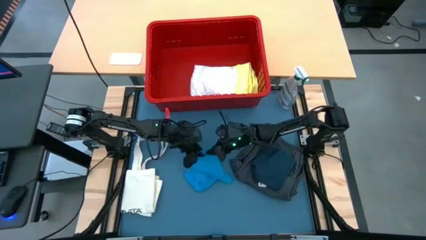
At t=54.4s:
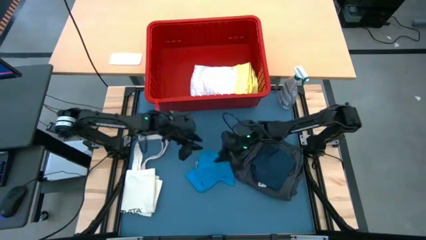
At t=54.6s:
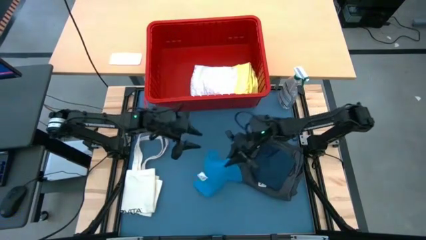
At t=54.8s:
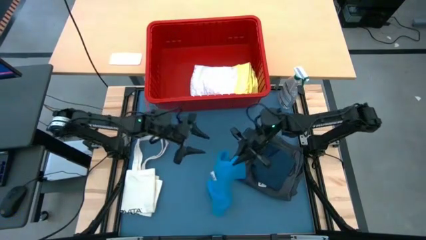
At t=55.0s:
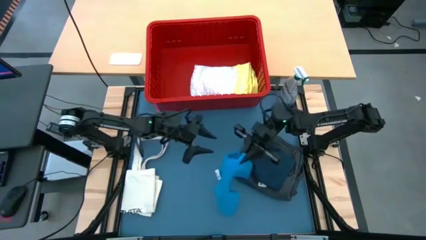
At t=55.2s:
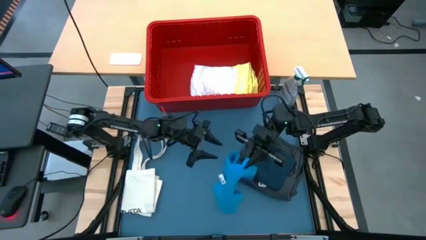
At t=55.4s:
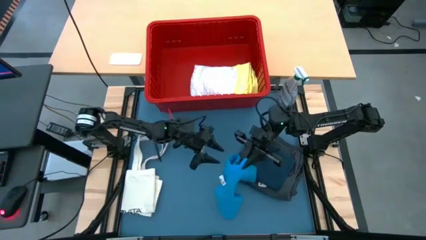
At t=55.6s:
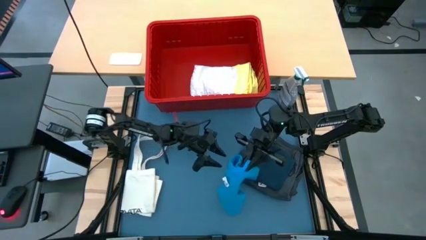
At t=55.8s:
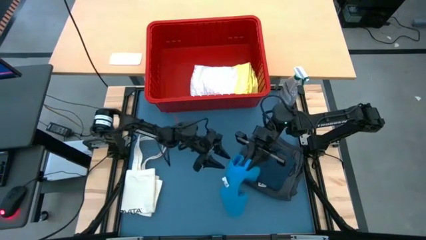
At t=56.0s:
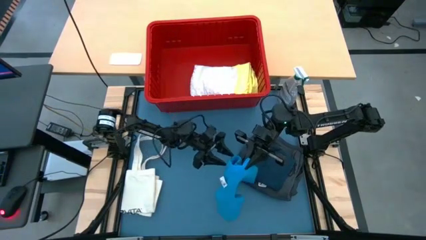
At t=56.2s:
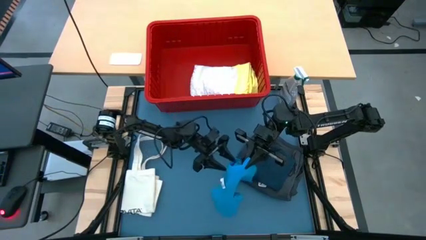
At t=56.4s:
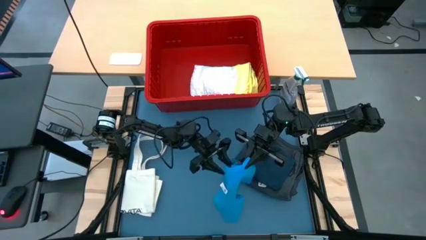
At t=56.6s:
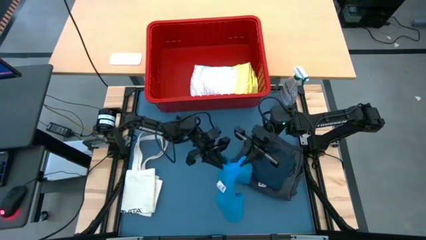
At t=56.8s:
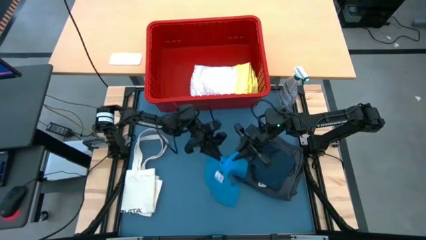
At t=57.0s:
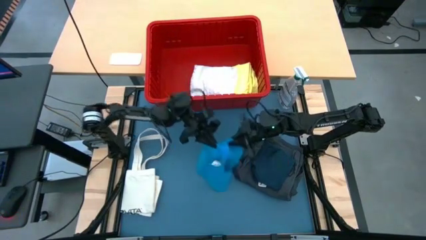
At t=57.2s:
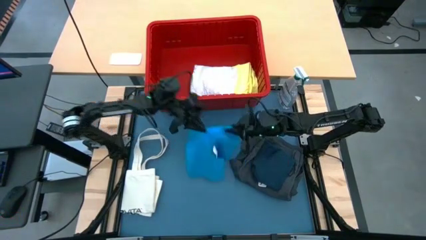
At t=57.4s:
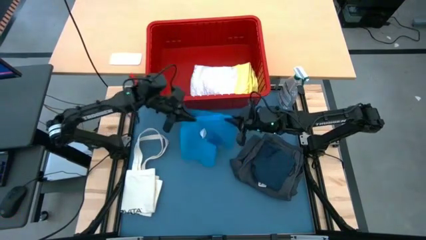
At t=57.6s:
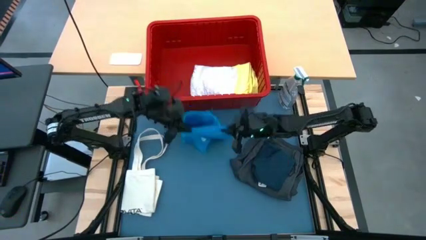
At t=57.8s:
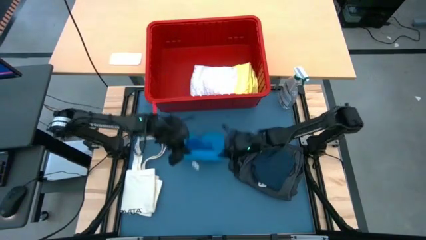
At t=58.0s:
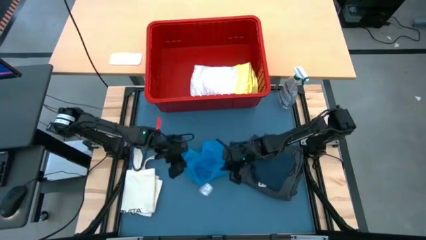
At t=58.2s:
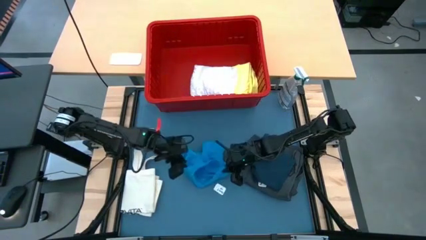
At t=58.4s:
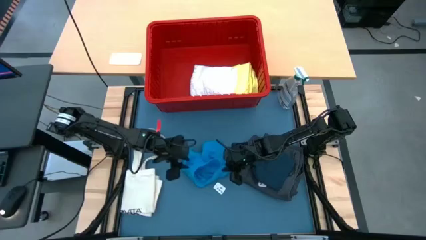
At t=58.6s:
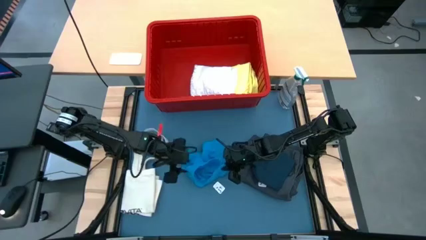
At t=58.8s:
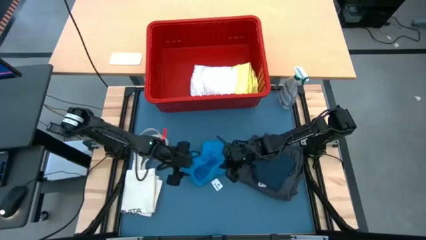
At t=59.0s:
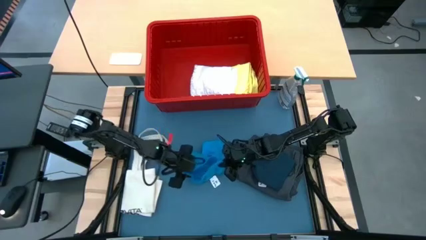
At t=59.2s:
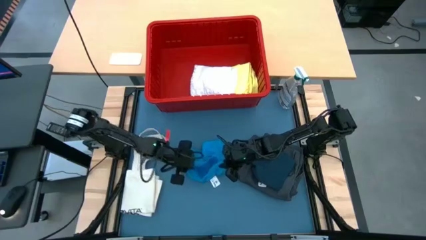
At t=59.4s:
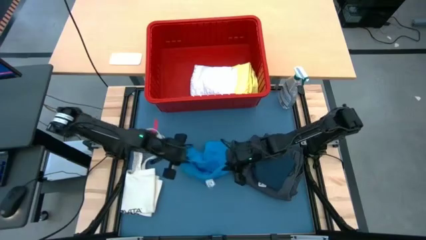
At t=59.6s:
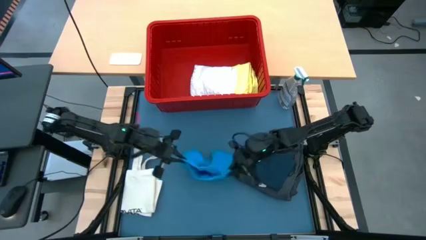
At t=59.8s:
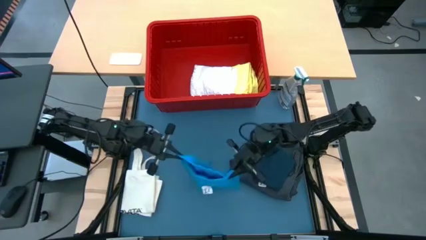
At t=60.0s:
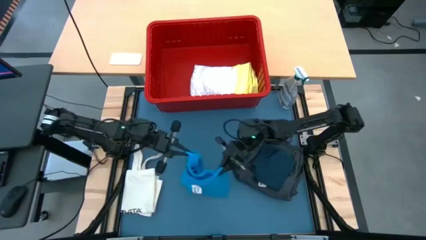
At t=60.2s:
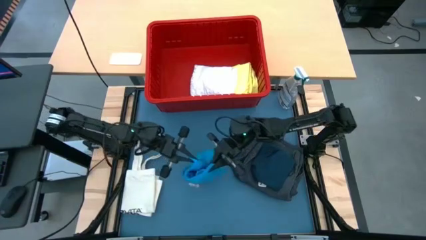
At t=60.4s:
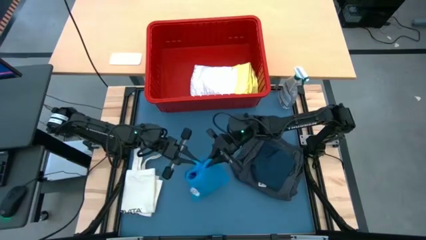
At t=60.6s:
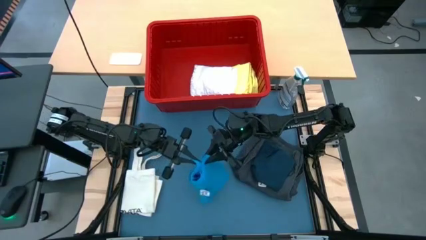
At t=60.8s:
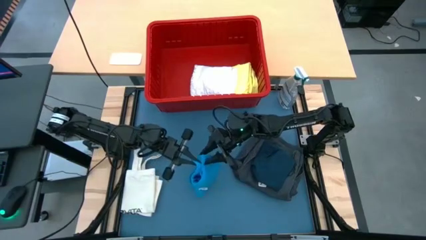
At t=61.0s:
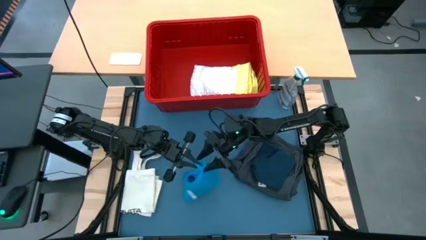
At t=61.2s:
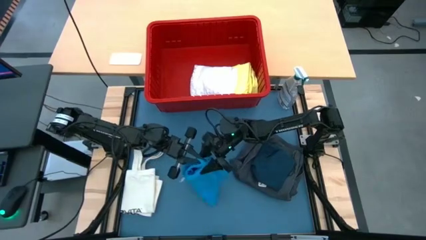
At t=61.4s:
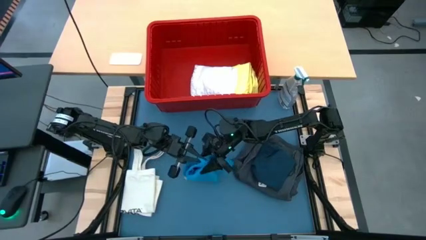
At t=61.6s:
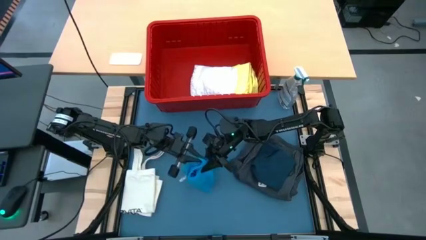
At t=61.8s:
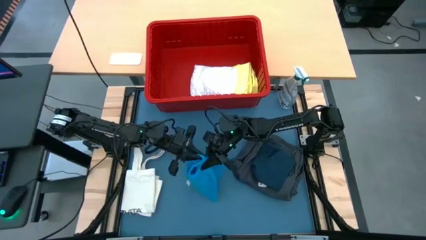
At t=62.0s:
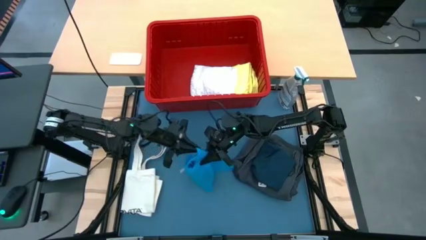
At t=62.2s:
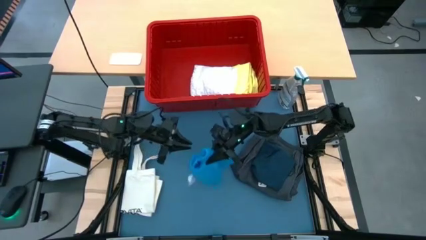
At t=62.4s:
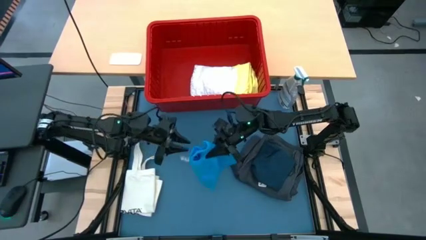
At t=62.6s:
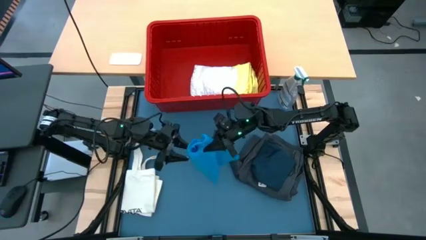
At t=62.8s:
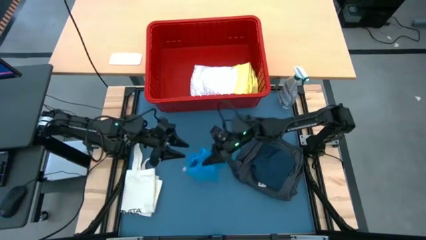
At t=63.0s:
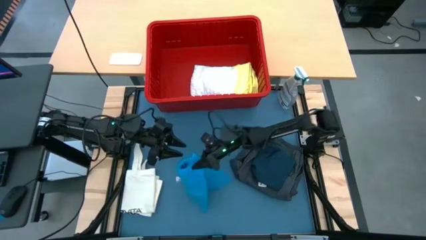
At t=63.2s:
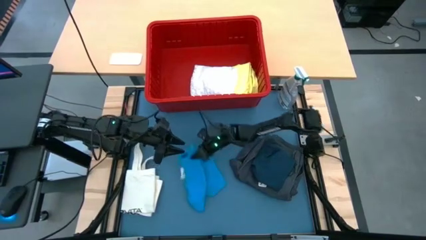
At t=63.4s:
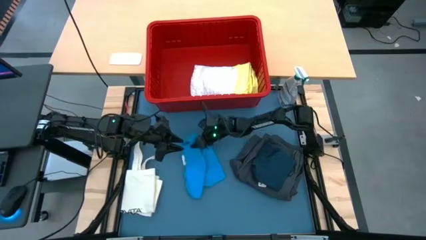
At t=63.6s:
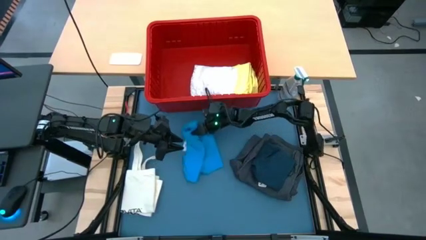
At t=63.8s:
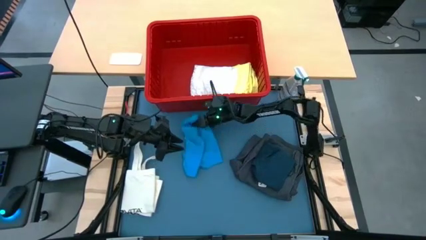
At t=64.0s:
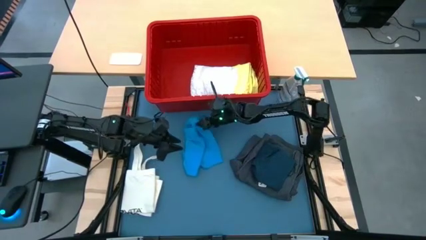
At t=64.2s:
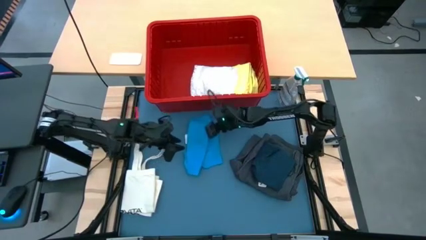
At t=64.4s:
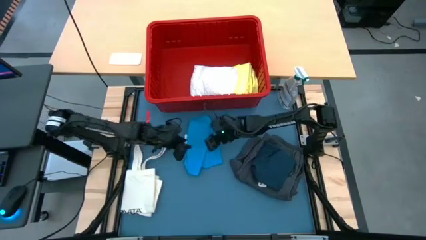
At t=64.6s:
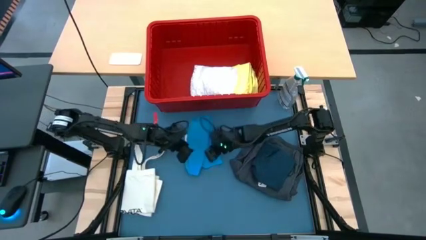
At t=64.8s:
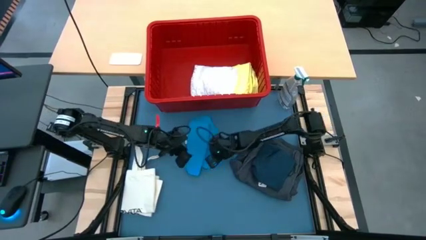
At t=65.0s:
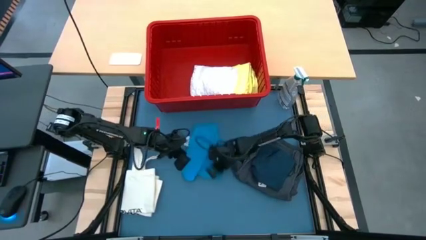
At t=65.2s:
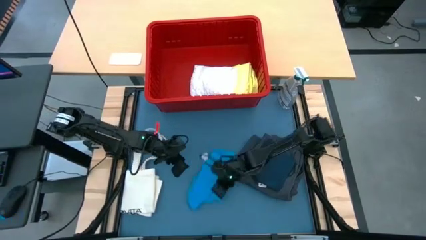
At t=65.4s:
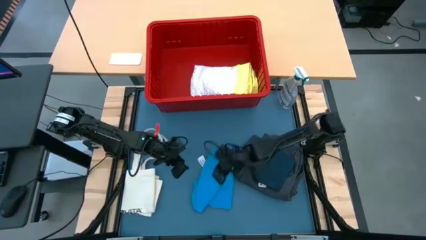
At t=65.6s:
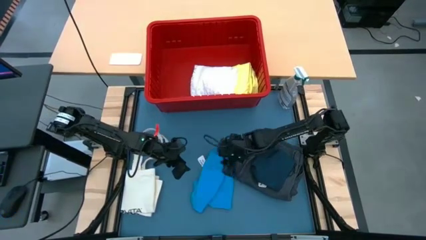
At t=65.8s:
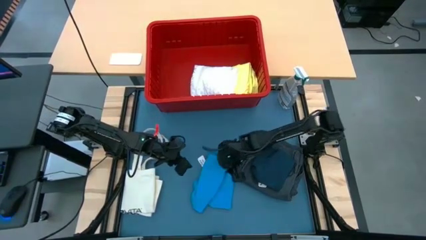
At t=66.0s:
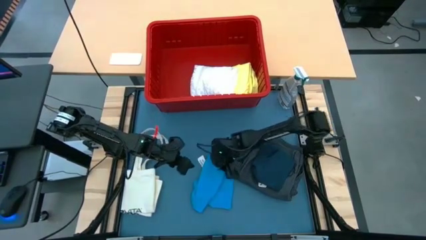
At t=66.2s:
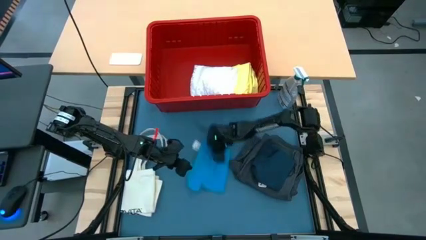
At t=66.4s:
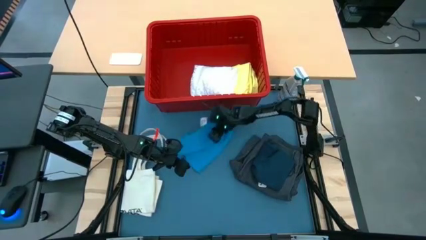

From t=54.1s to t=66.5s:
Task: Fold Laundry from Bin
Fold the blue shorts
